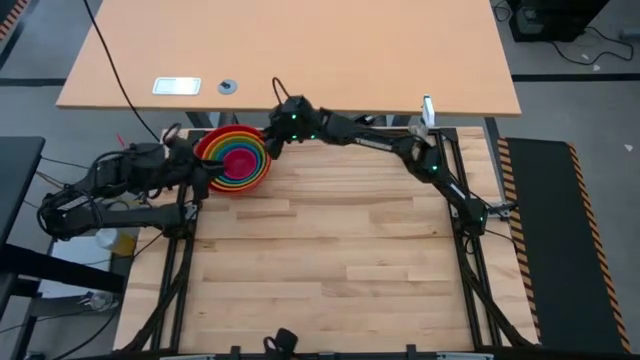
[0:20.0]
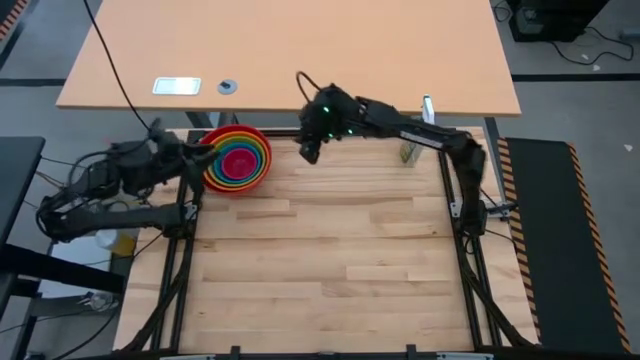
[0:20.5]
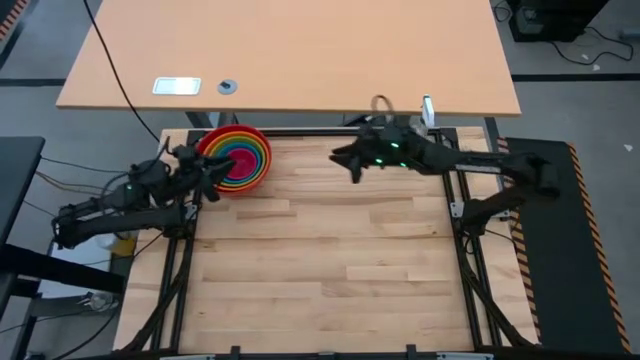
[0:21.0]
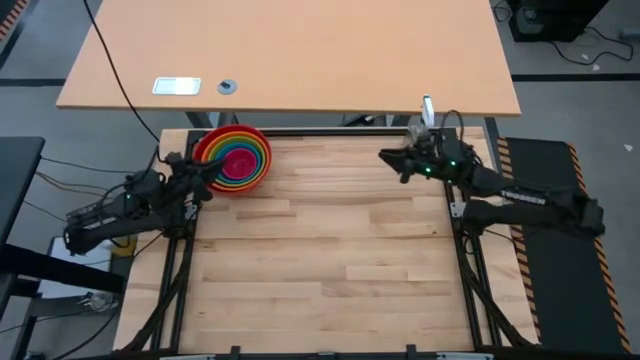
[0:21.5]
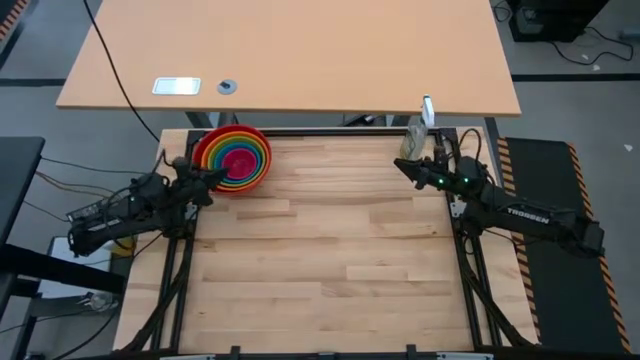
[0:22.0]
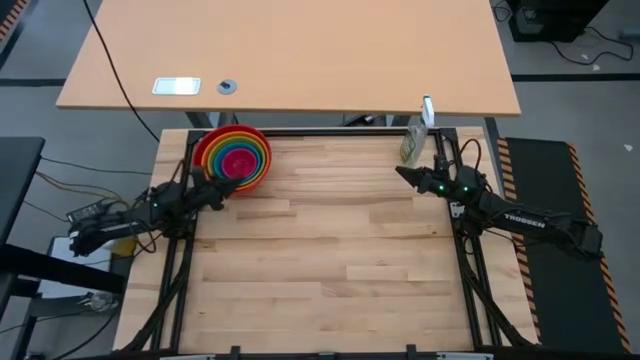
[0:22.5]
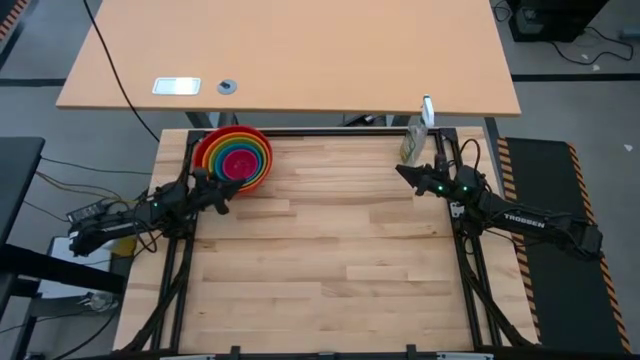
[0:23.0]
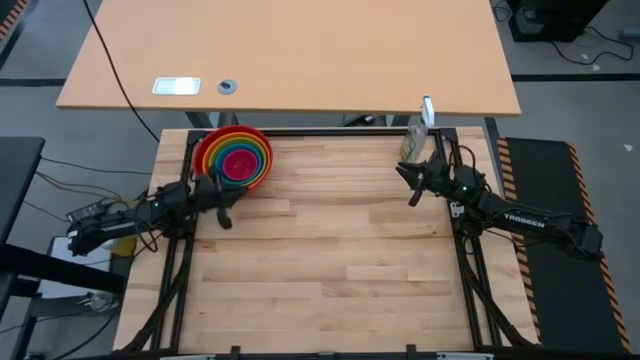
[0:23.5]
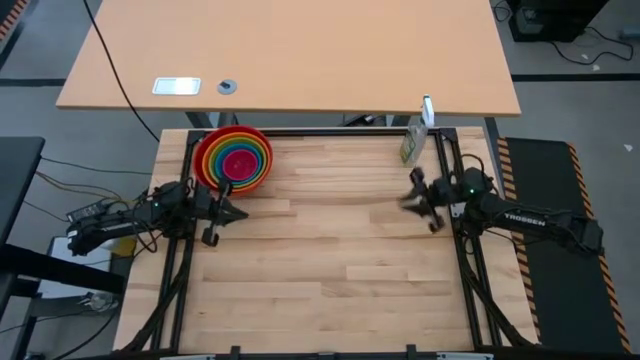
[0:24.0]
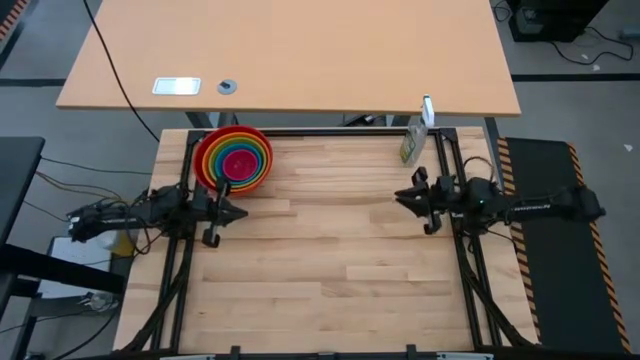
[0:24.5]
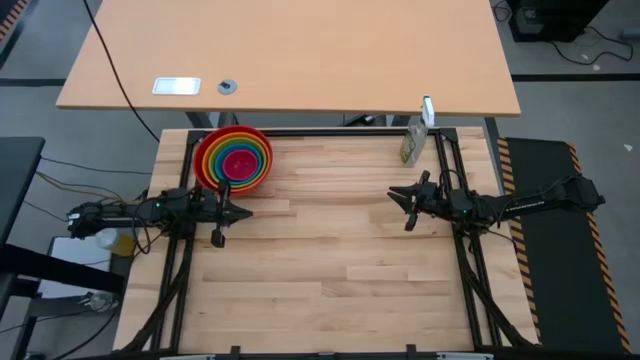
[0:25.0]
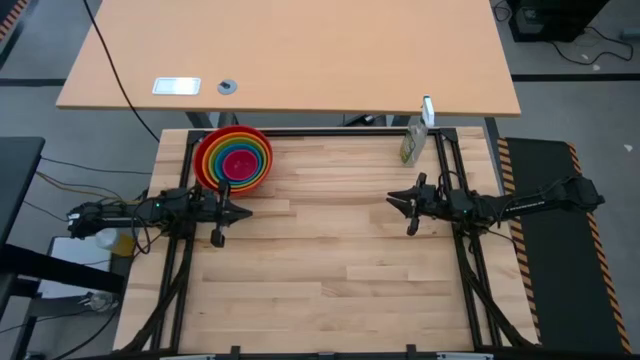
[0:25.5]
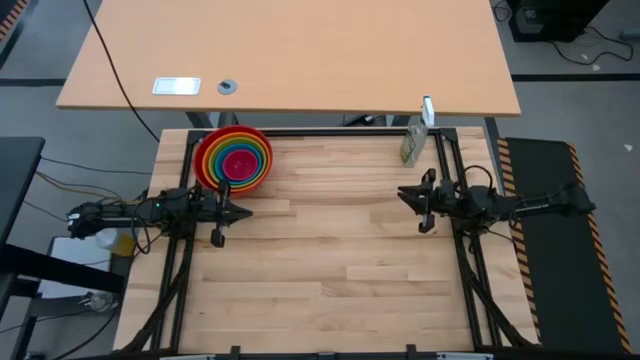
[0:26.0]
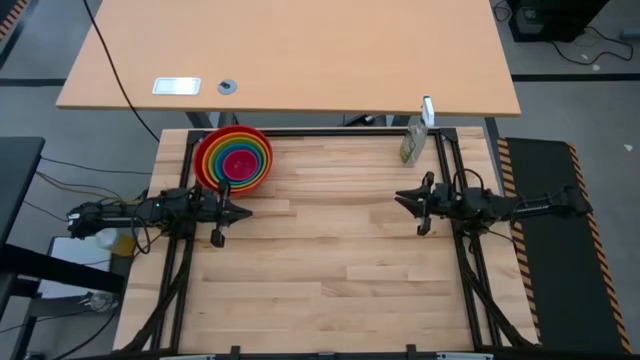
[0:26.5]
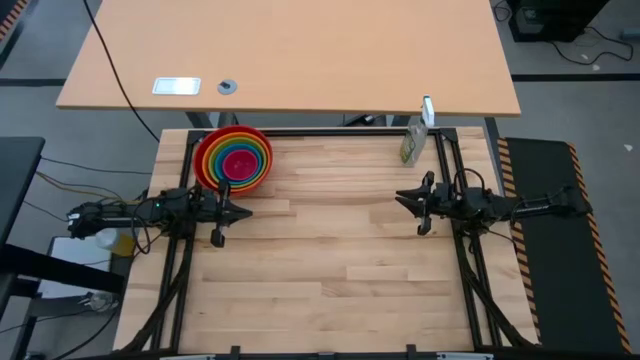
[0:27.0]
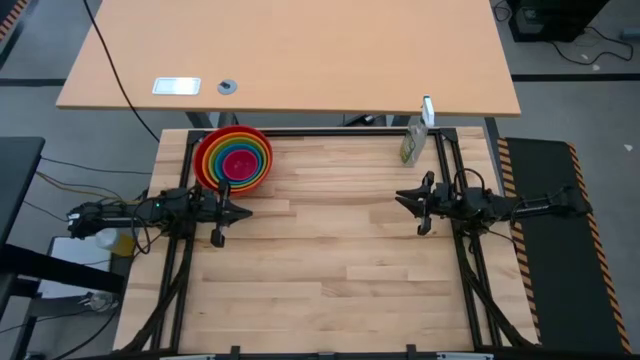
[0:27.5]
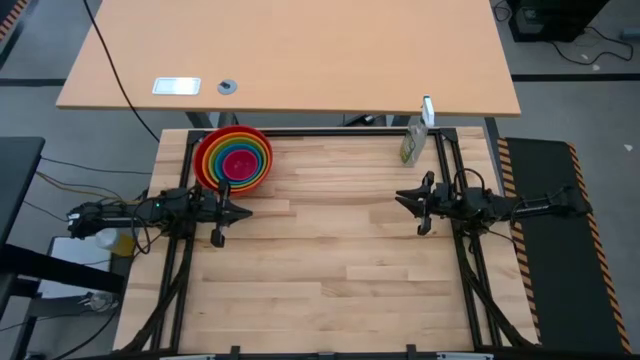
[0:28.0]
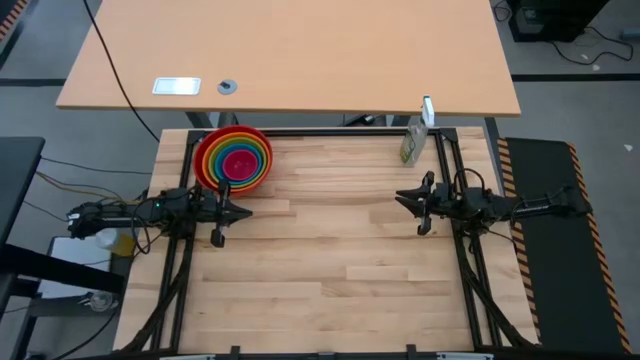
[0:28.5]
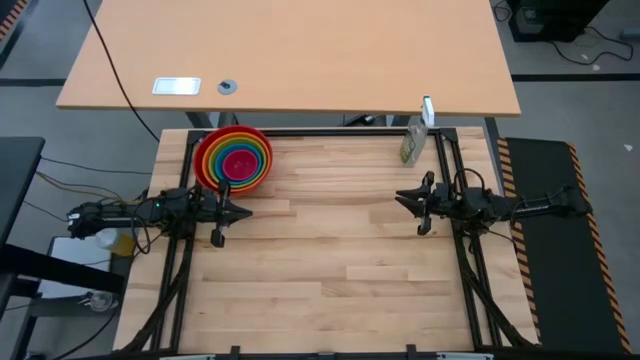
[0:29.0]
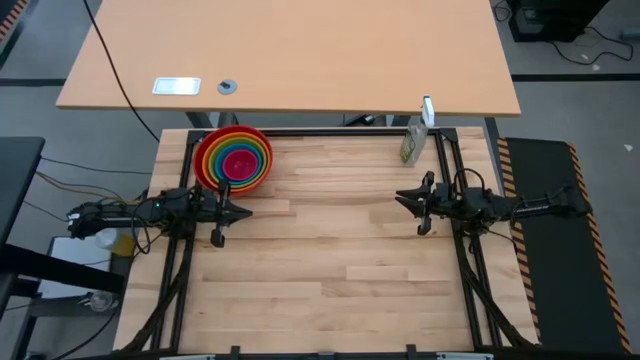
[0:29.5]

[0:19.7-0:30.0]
Return to Home Position

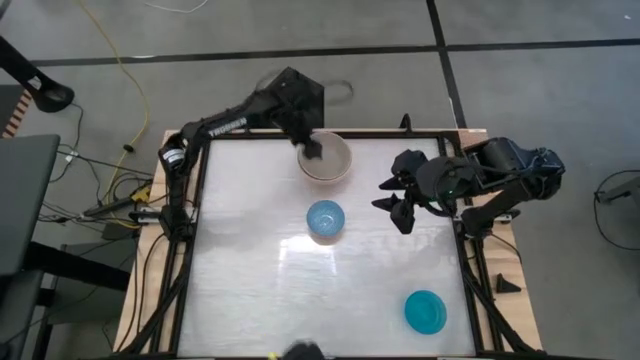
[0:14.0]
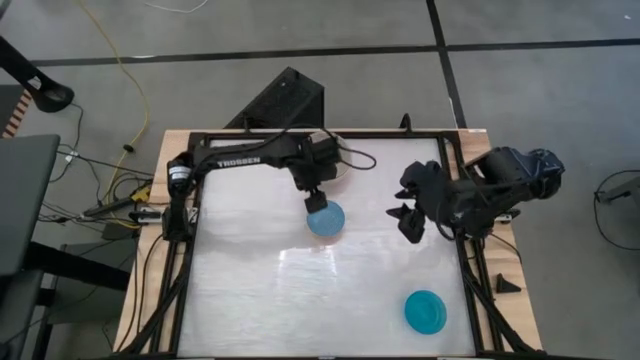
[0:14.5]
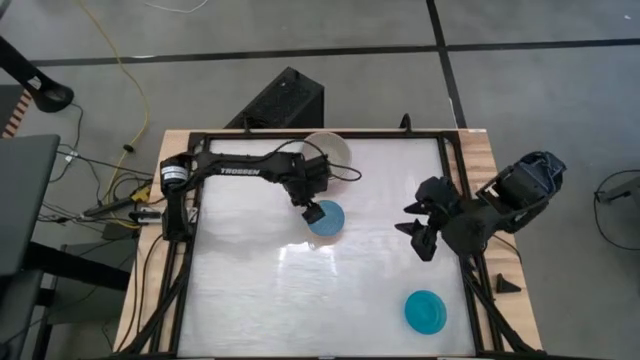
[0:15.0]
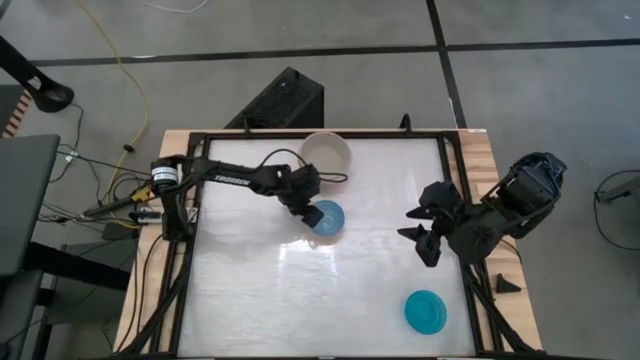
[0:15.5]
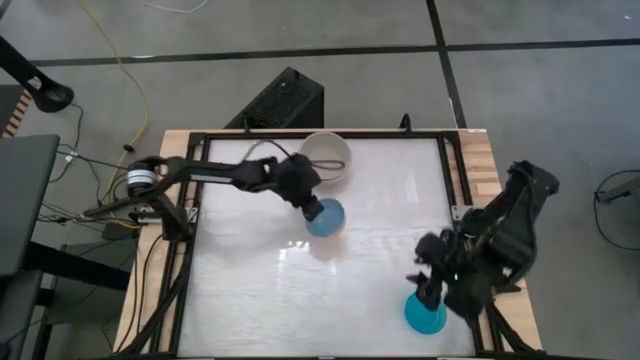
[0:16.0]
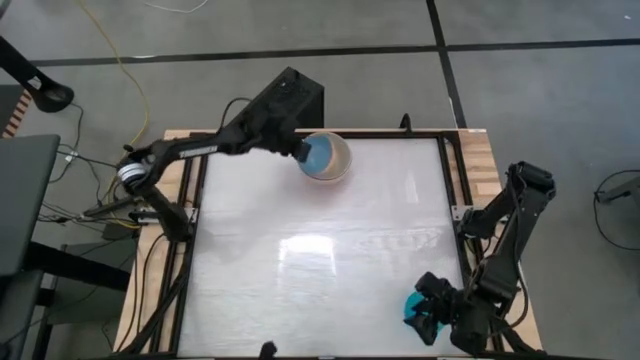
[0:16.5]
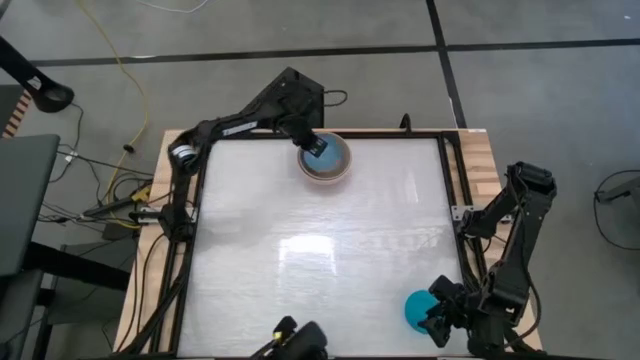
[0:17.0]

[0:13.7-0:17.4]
Stack the printed blue bowl on top of the gray bowl

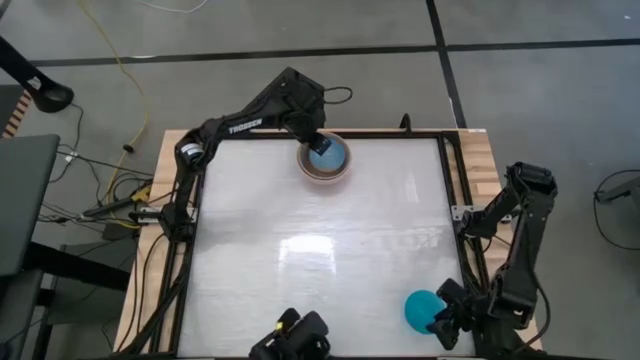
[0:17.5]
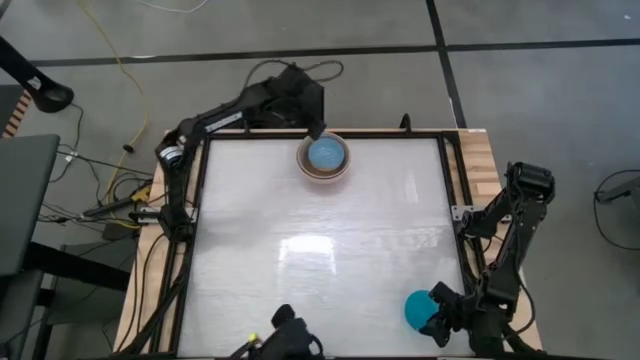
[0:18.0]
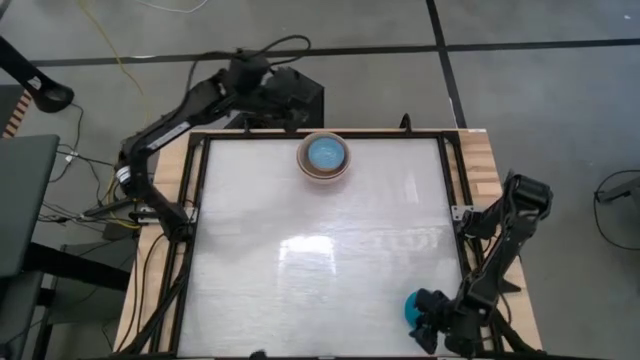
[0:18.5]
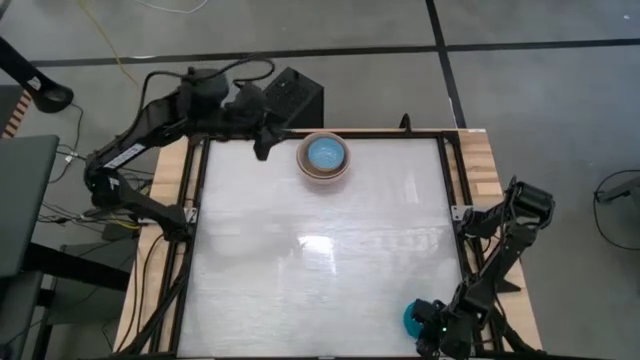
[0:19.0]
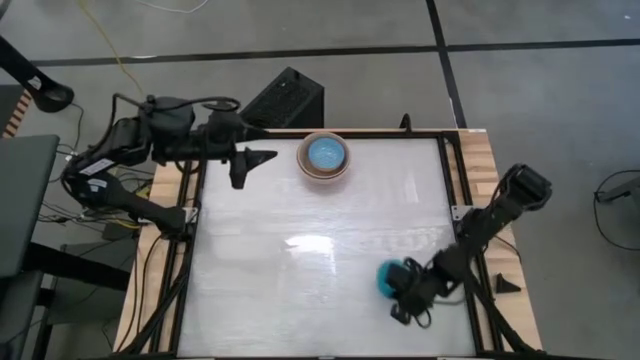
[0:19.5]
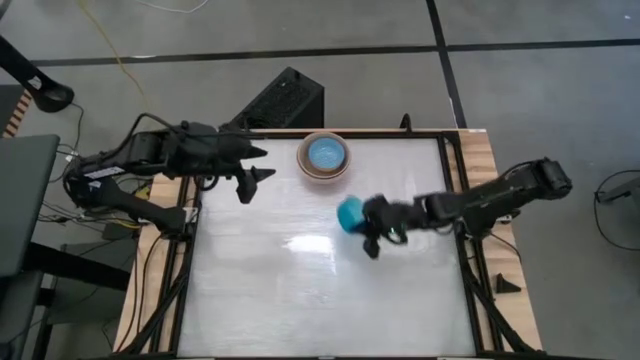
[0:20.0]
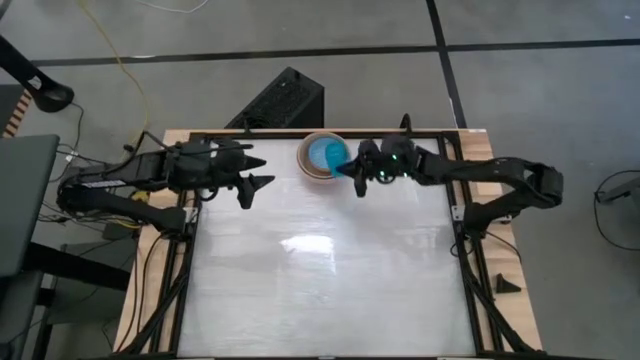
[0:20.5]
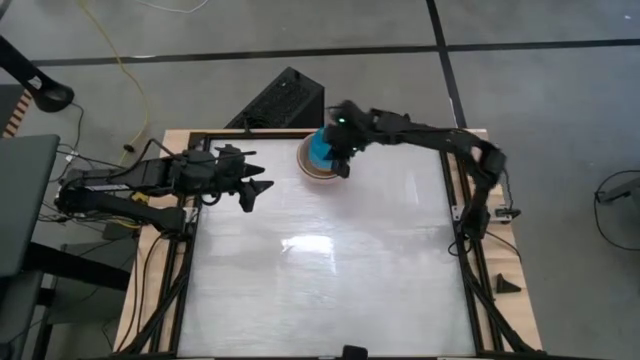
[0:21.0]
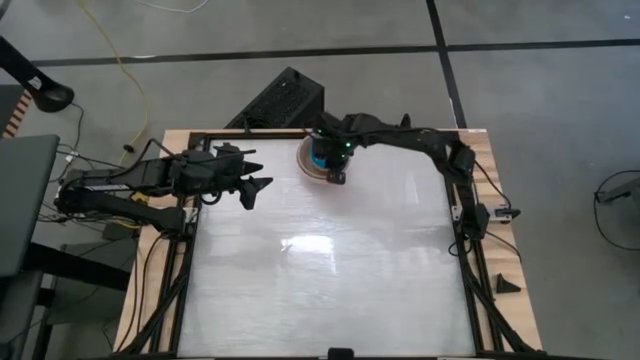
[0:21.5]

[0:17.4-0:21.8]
Stack the transparent blue bowl on top of the printed blue bowl

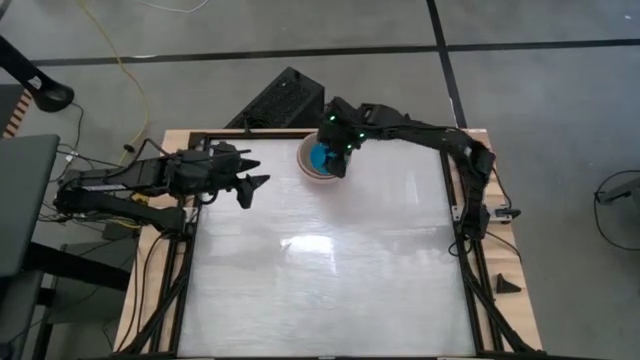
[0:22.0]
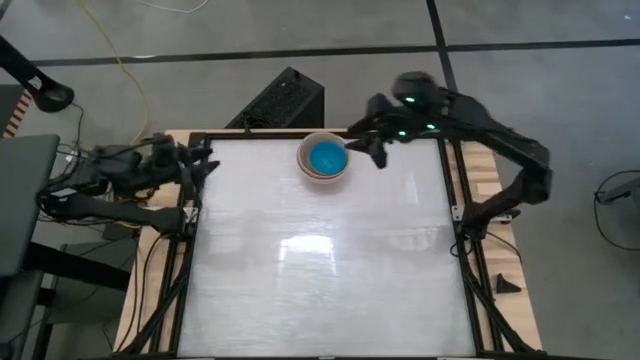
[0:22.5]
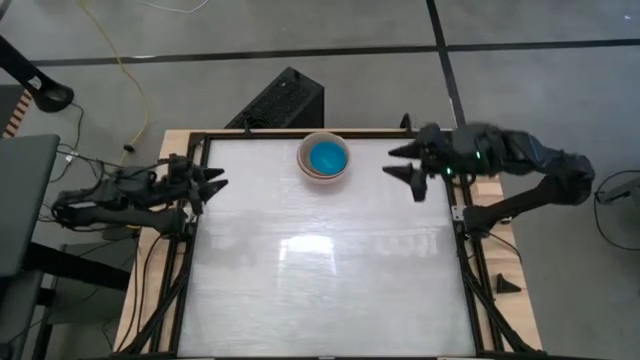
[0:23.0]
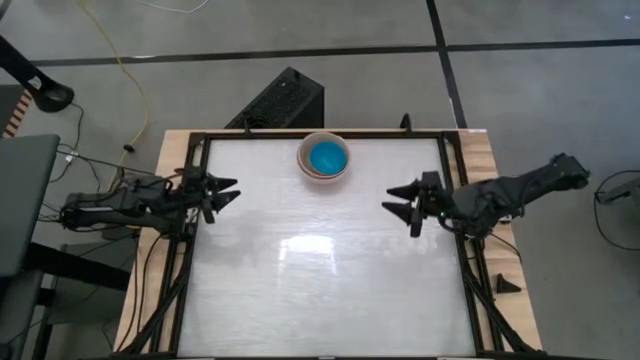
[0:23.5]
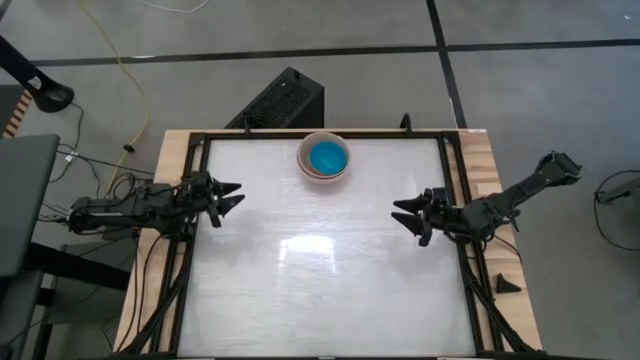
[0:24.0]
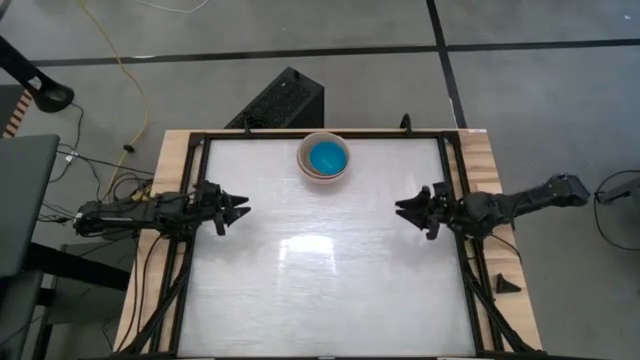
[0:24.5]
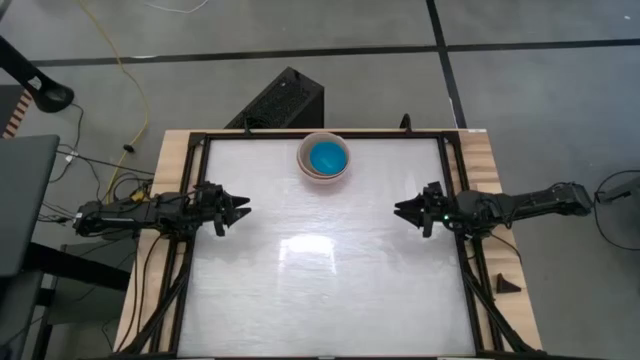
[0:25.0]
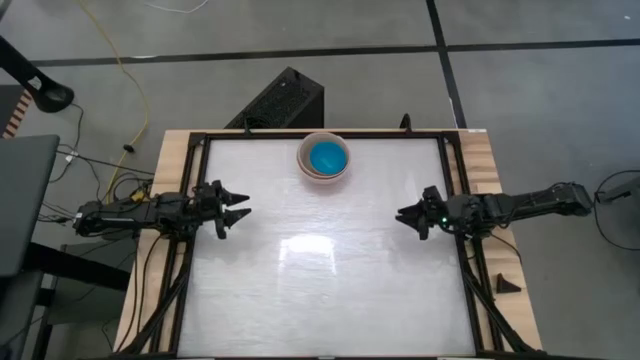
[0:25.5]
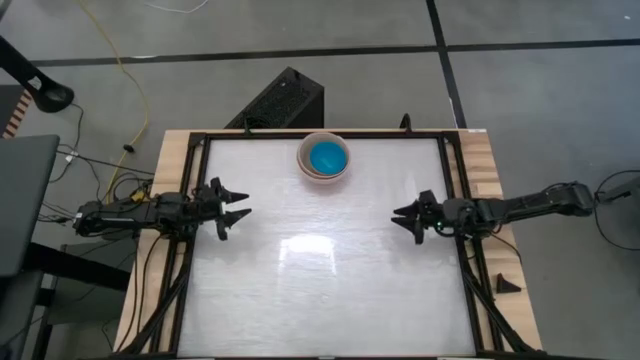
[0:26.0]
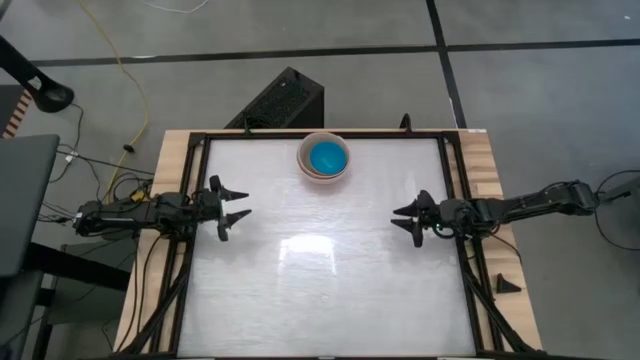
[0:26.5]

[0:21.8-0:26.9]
Return to Home Position
